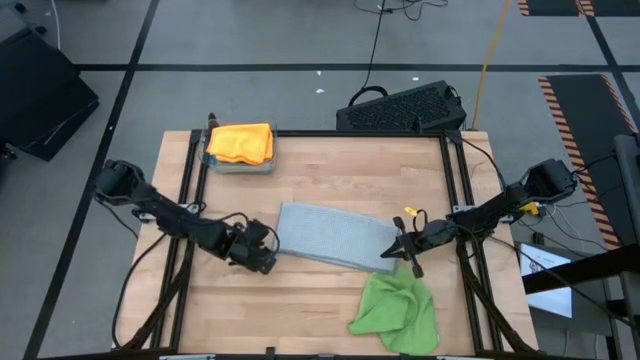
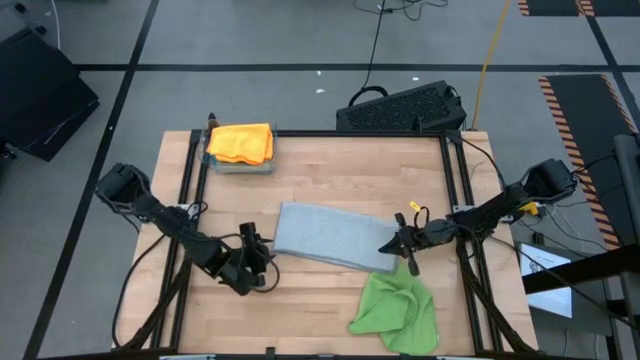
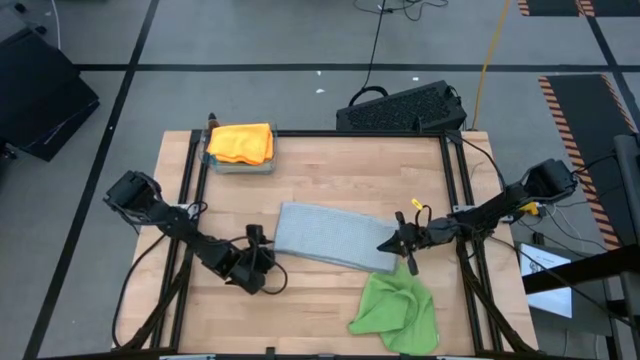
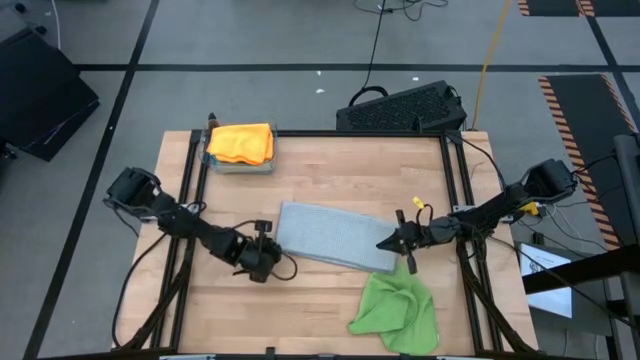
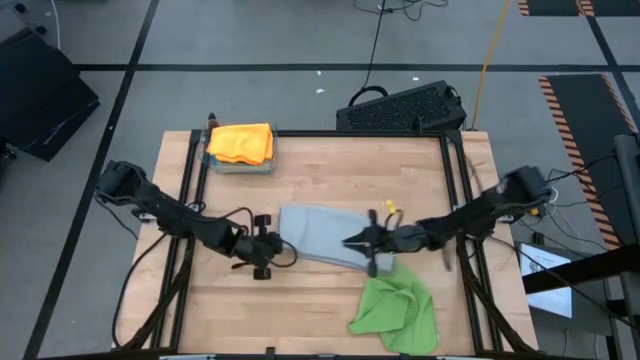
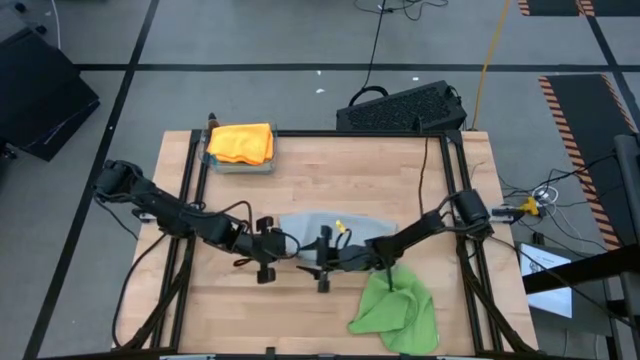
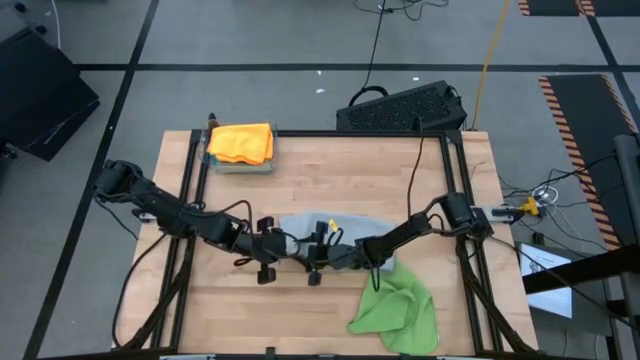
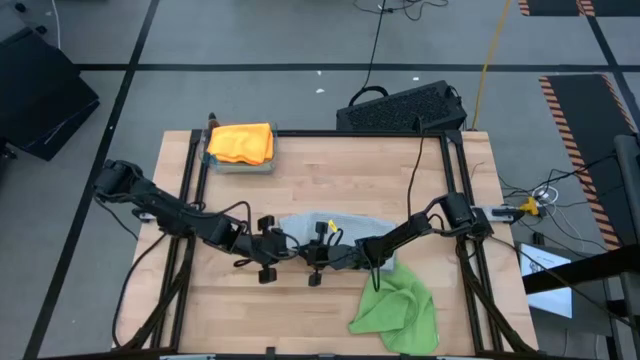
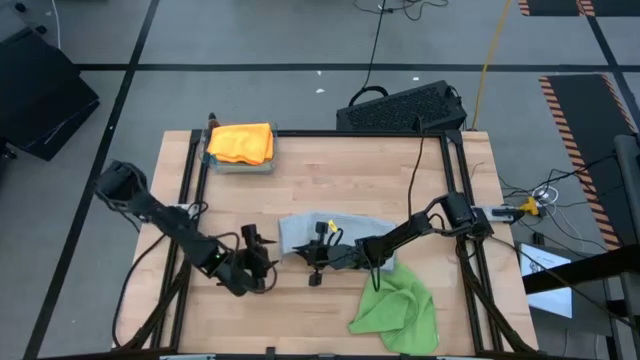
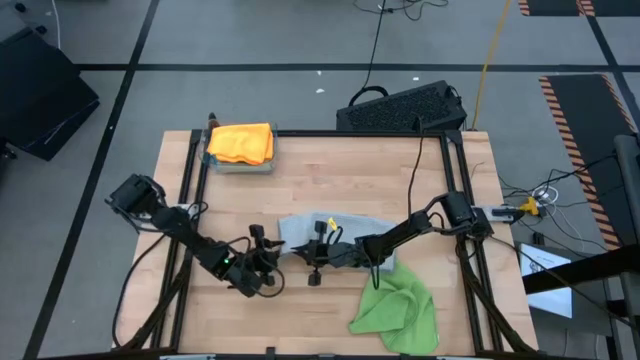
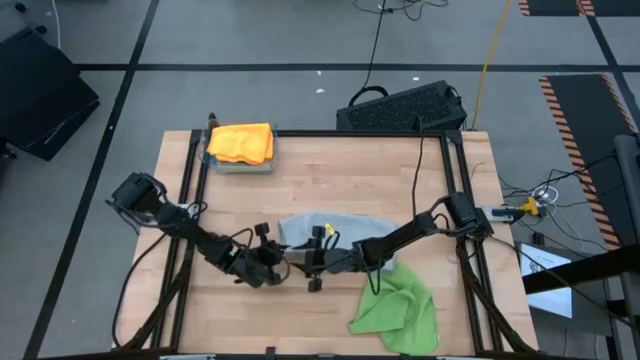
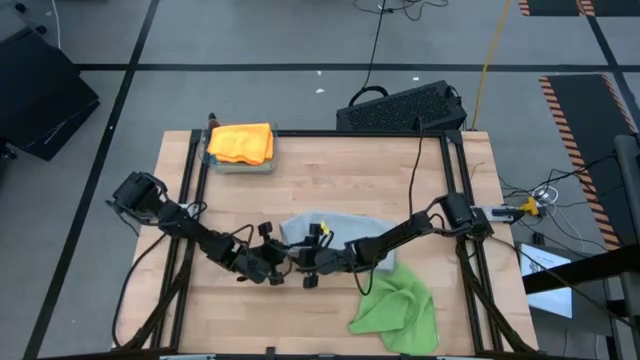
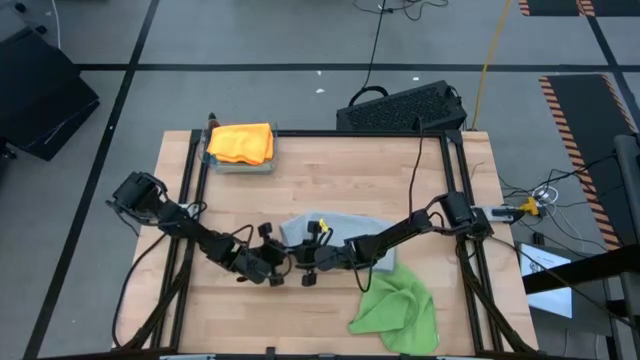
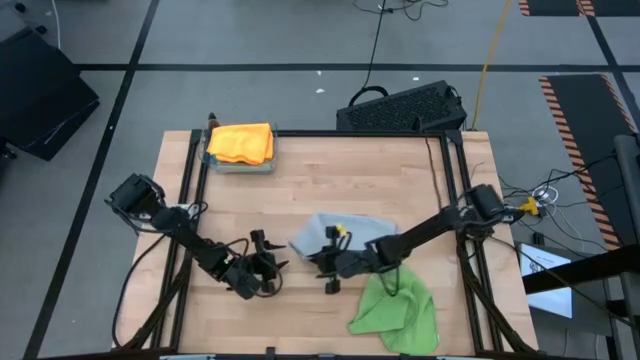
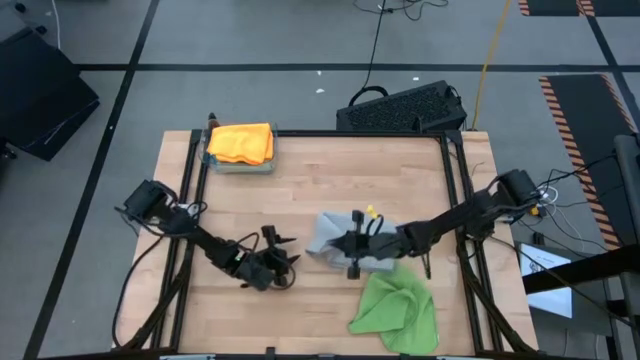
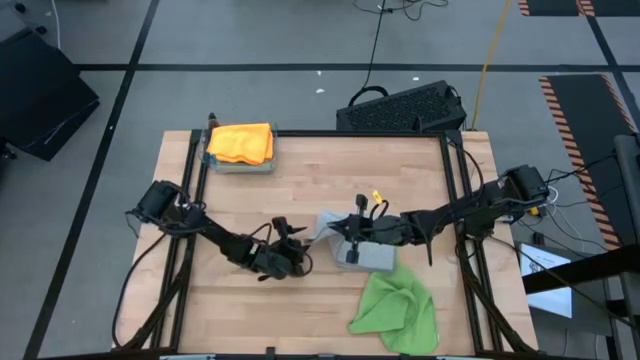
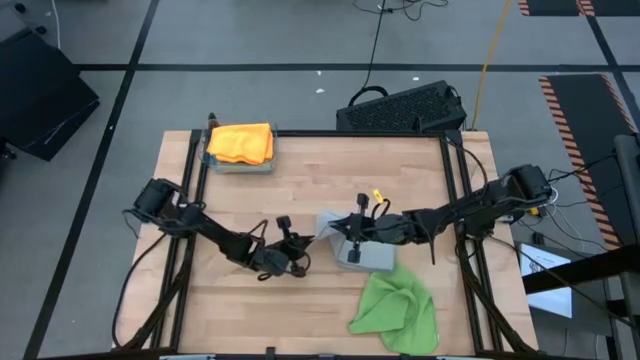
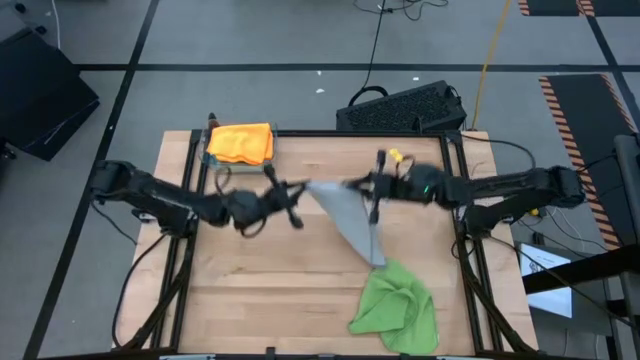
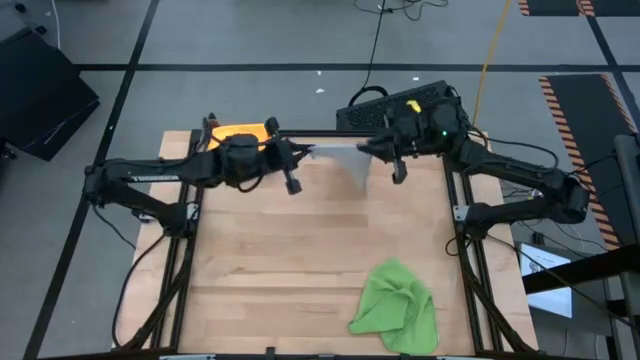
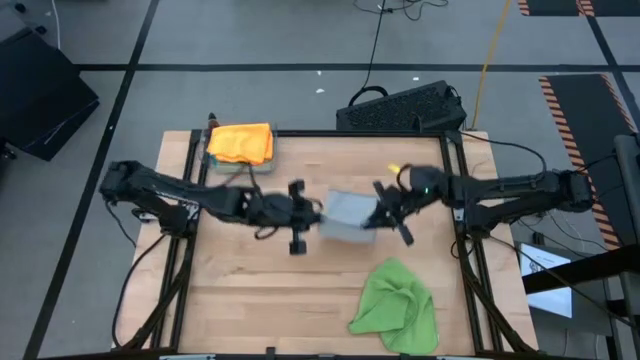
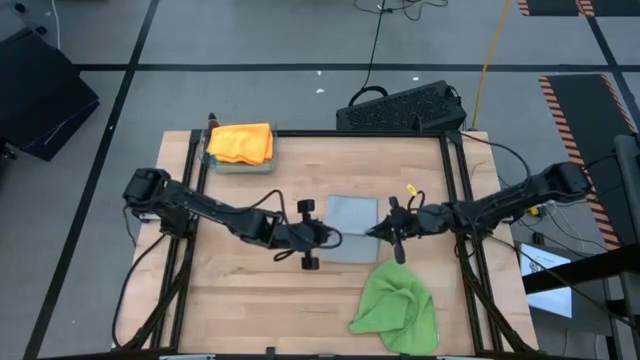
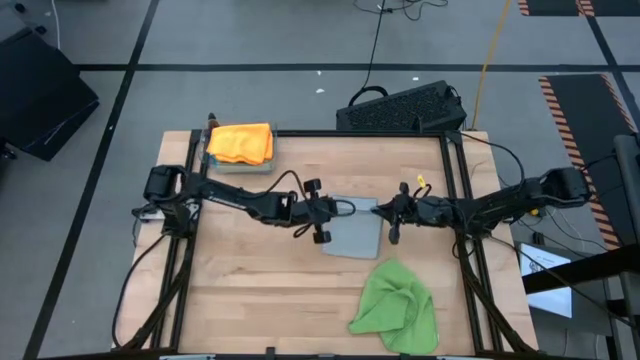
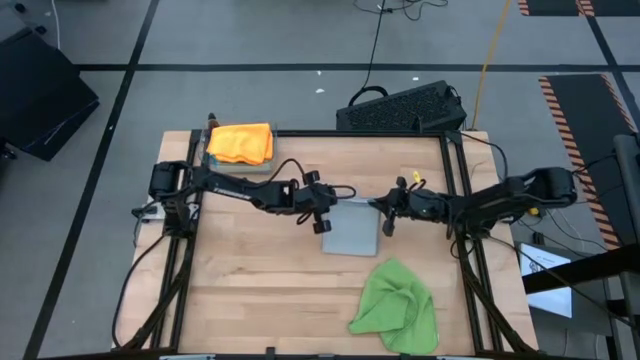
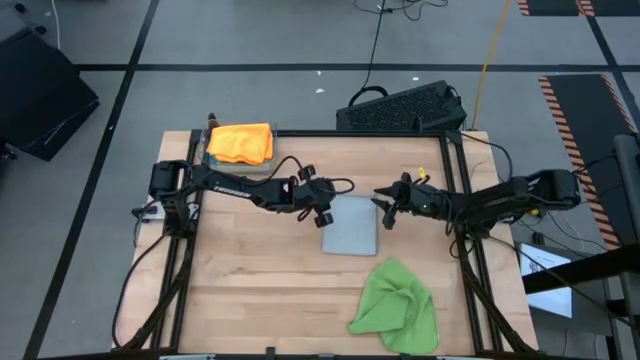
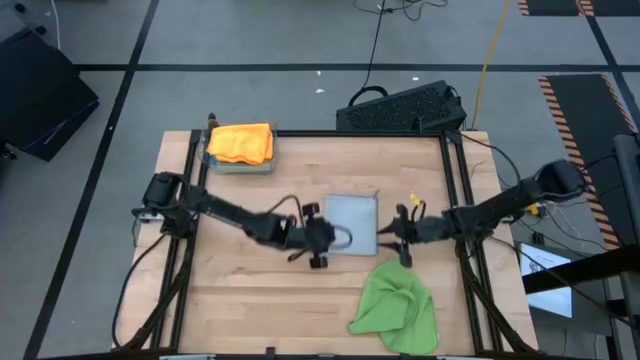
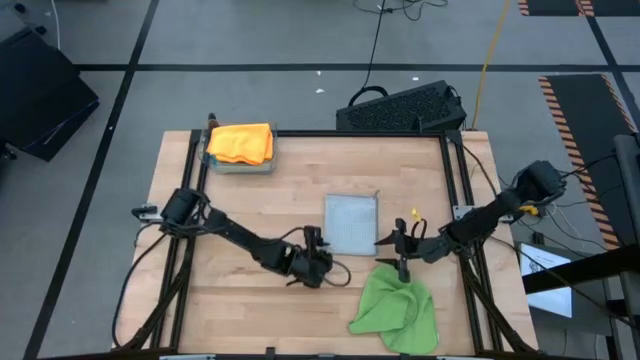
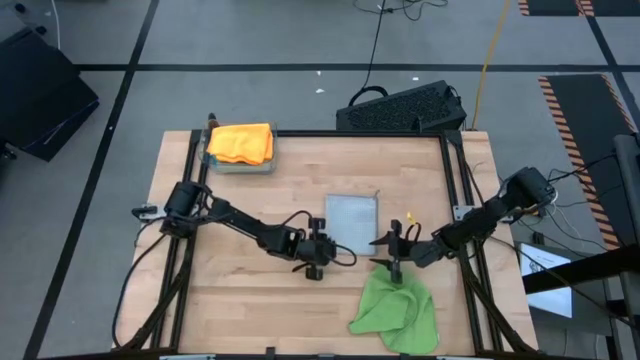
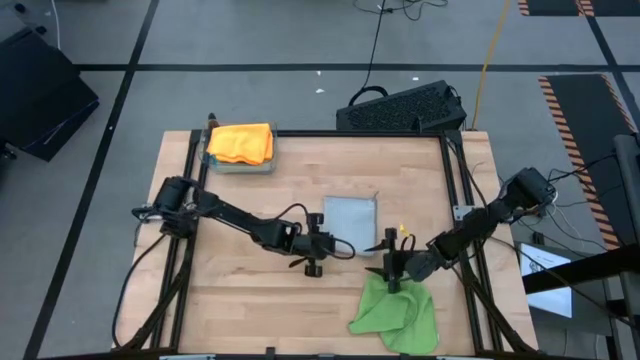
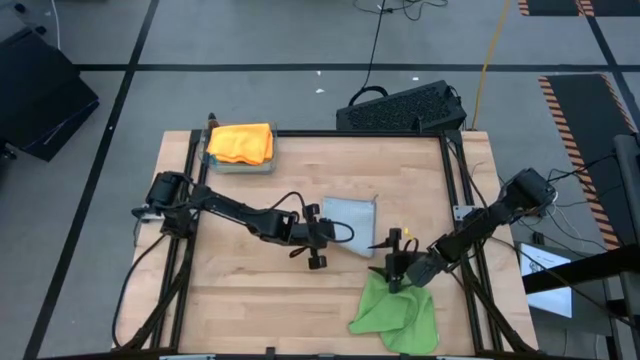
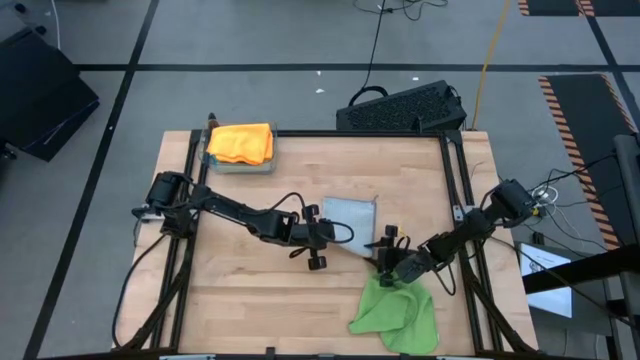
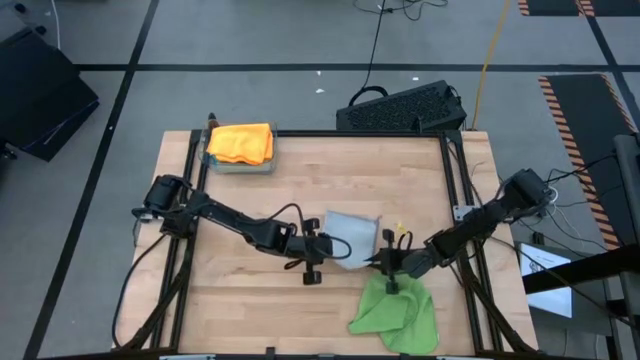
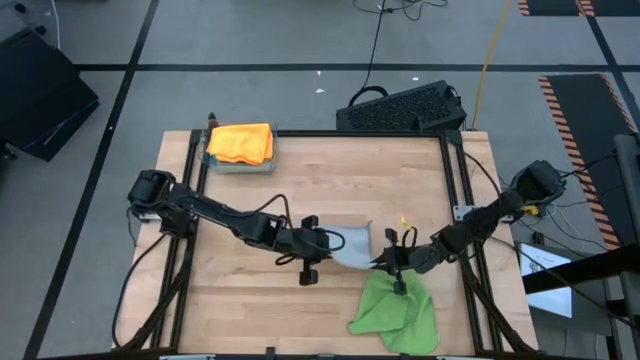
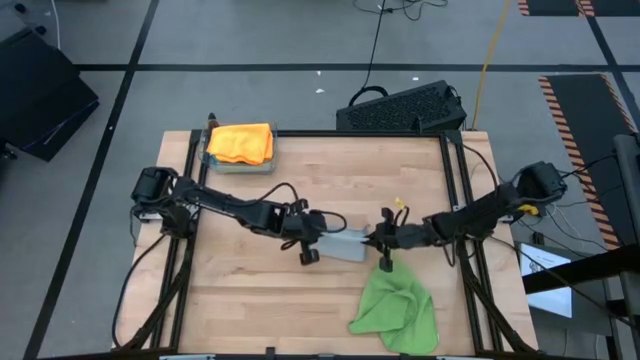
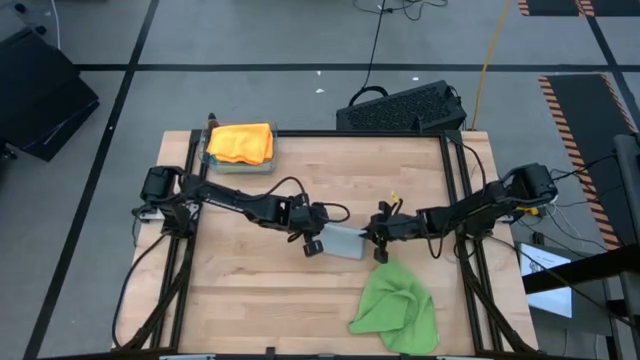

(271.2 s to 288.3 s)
Task: Fold microfiber towels
Fold the gray microfiber cloth

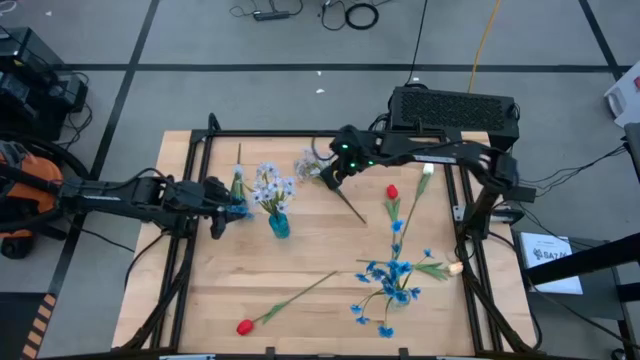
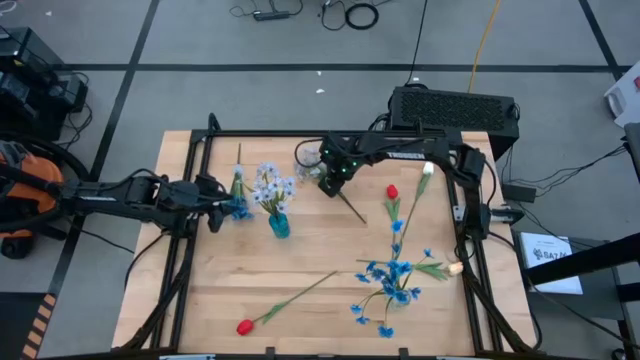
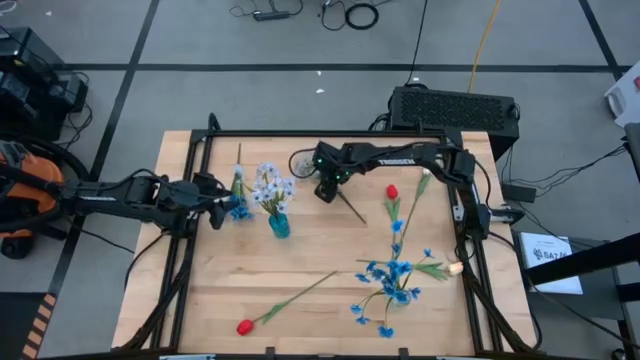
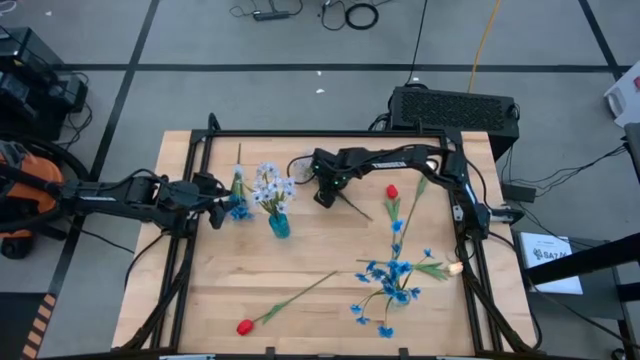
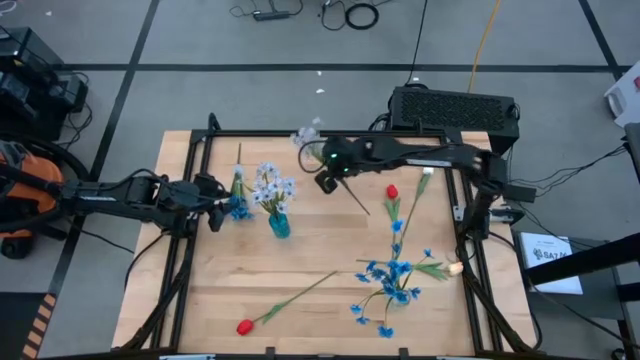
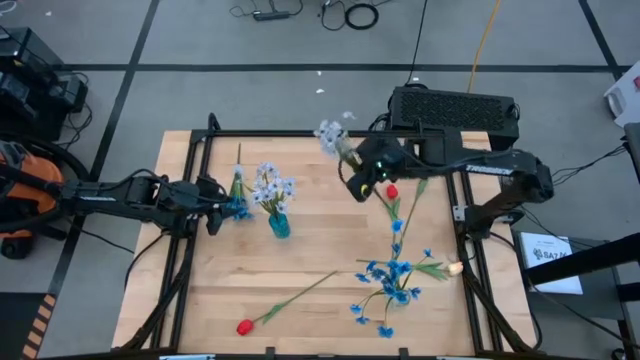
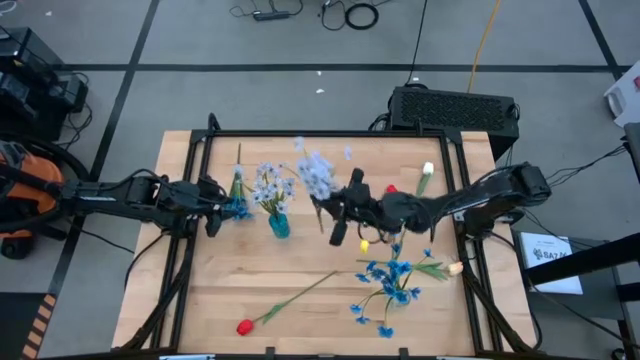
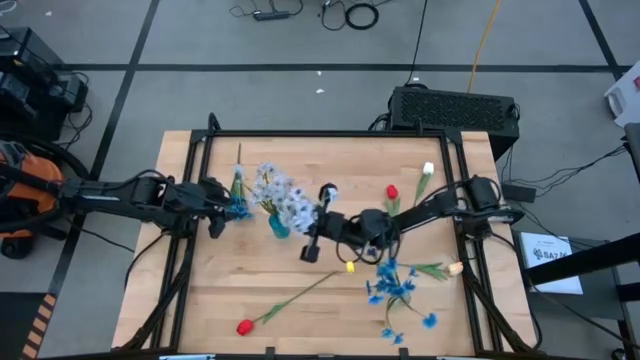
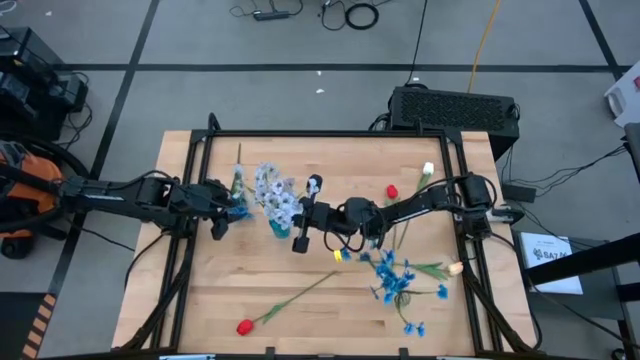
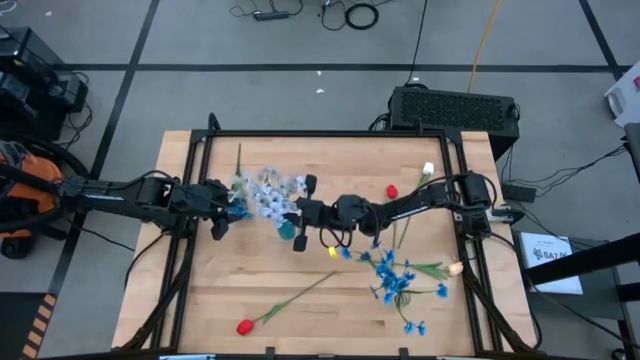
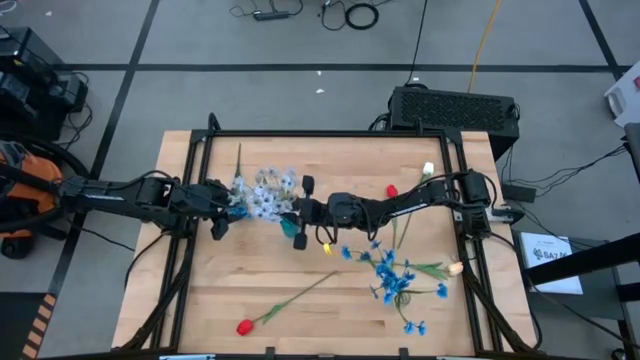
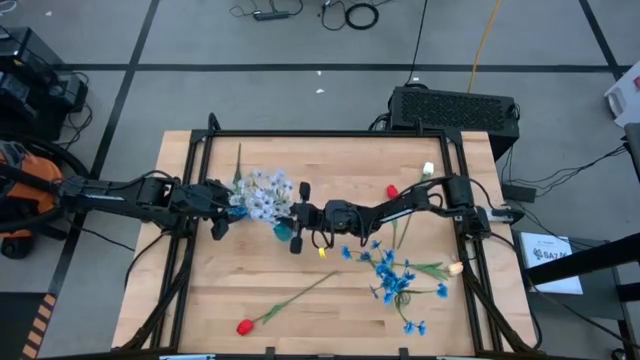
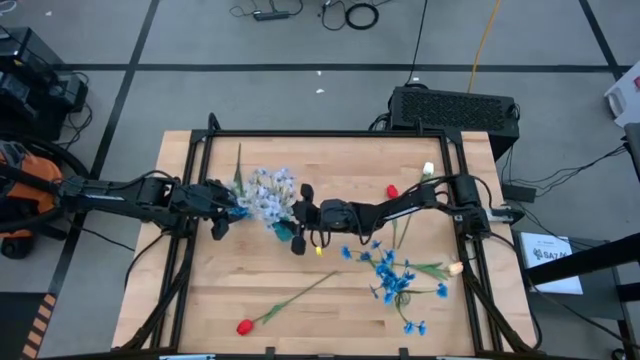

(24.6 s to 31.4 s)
Task: Sort flowers into vase by color
Put the white flower into the blue vase
